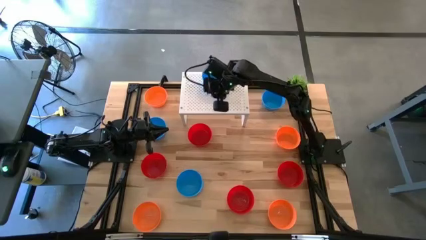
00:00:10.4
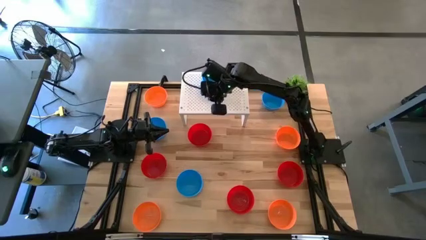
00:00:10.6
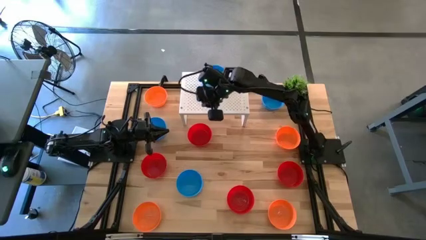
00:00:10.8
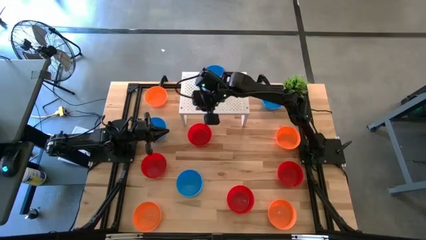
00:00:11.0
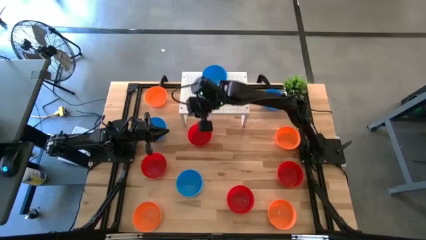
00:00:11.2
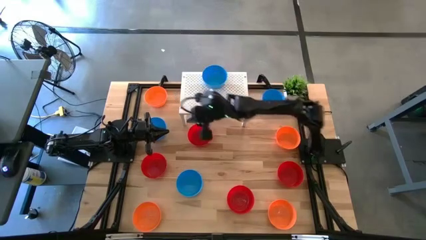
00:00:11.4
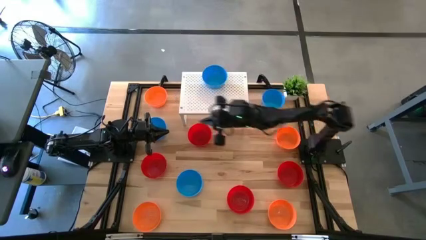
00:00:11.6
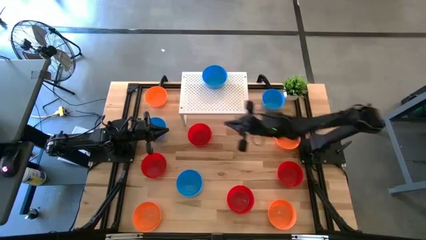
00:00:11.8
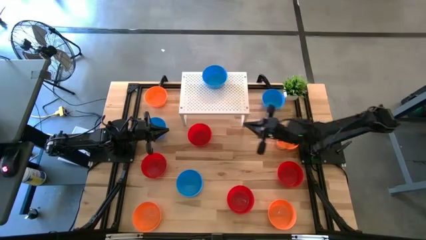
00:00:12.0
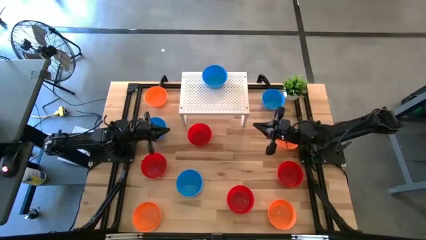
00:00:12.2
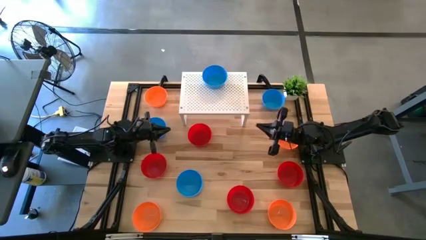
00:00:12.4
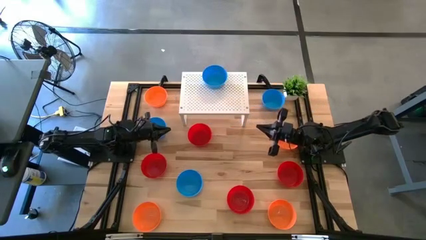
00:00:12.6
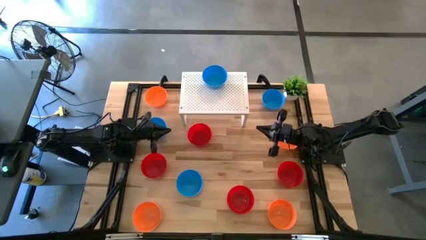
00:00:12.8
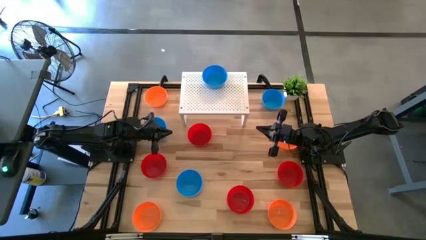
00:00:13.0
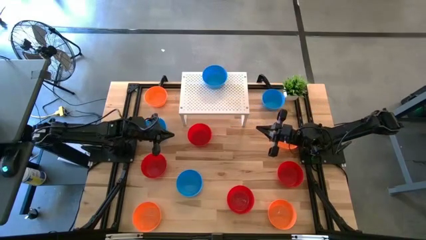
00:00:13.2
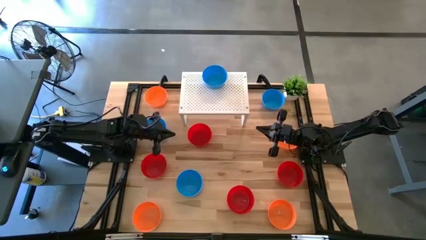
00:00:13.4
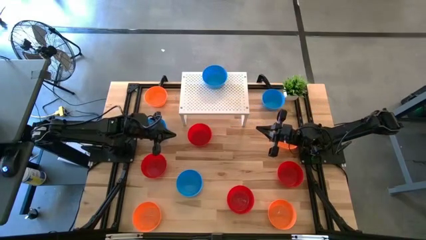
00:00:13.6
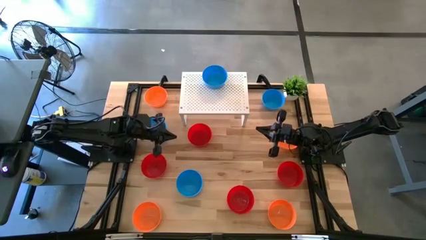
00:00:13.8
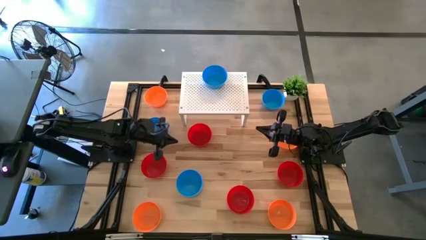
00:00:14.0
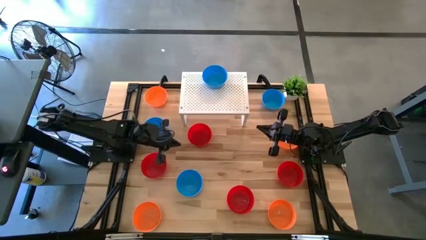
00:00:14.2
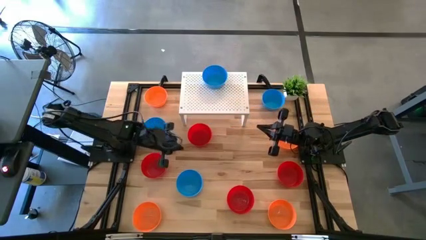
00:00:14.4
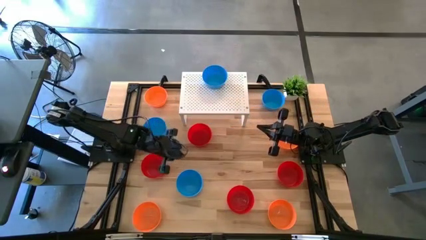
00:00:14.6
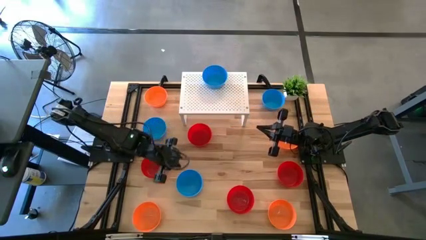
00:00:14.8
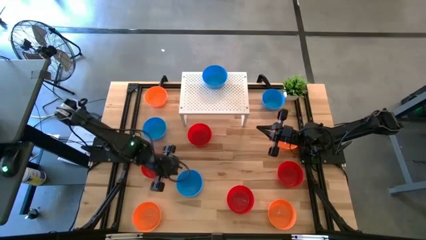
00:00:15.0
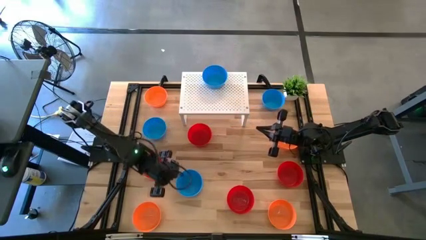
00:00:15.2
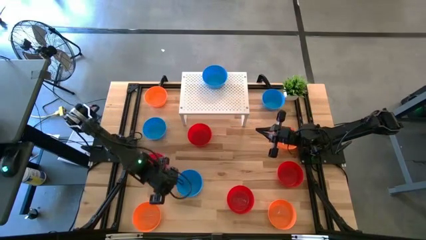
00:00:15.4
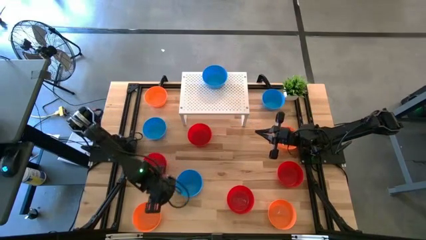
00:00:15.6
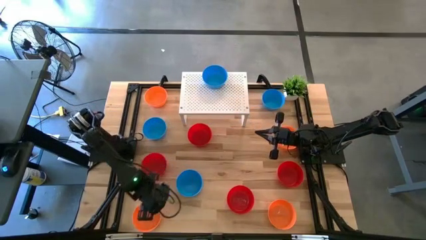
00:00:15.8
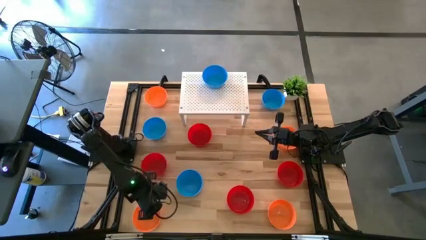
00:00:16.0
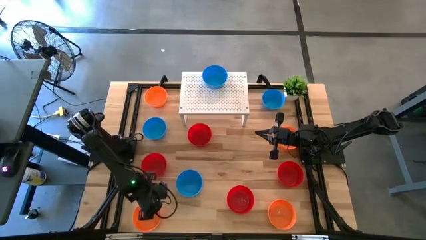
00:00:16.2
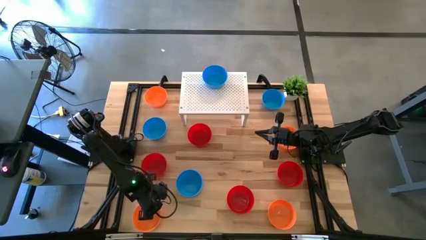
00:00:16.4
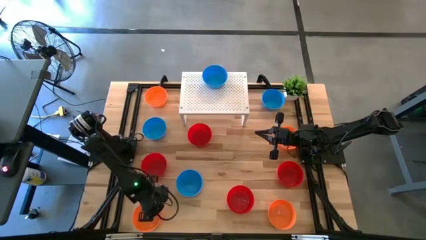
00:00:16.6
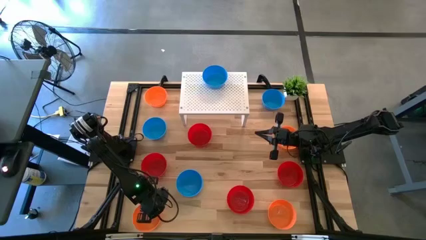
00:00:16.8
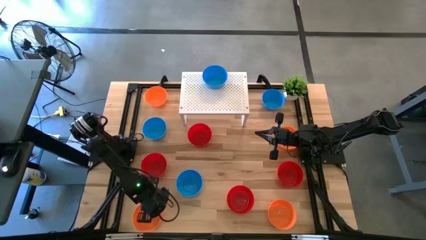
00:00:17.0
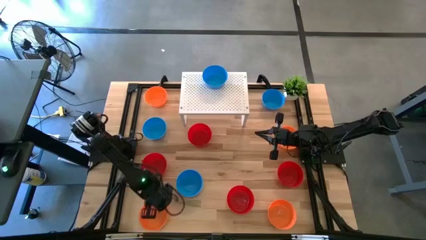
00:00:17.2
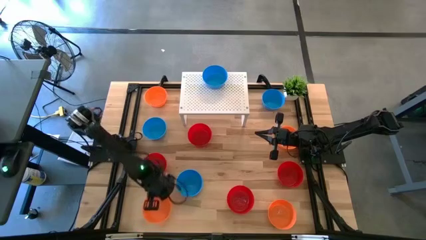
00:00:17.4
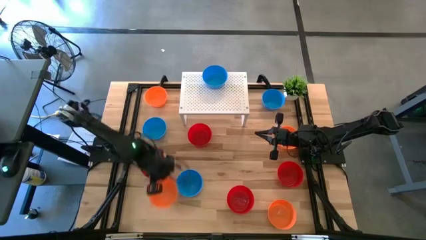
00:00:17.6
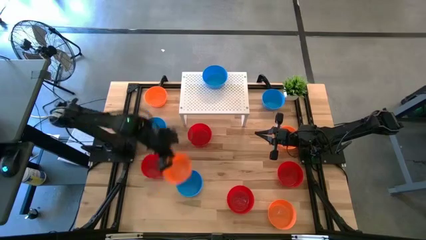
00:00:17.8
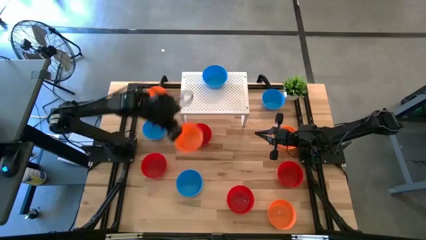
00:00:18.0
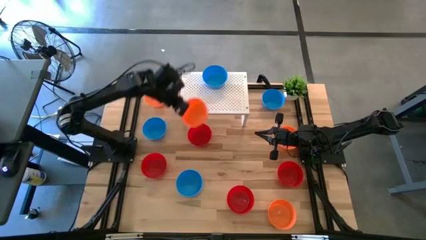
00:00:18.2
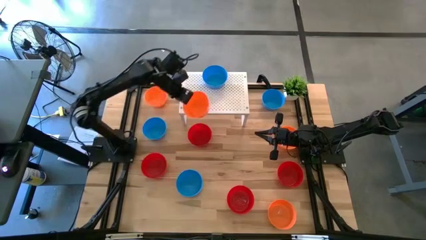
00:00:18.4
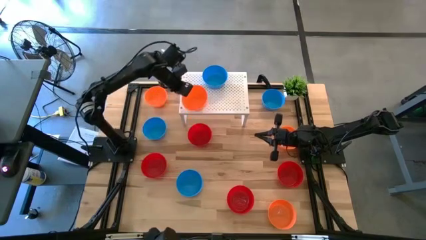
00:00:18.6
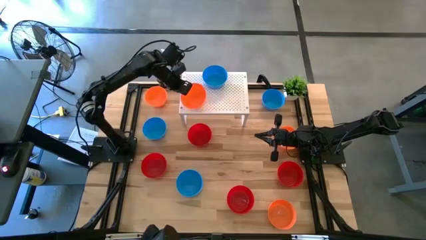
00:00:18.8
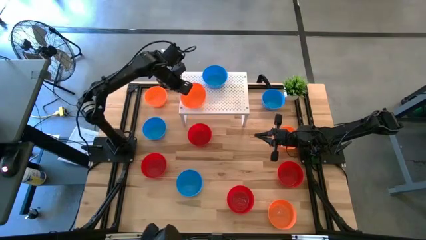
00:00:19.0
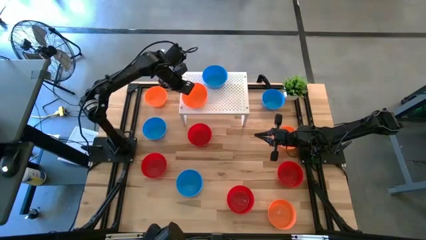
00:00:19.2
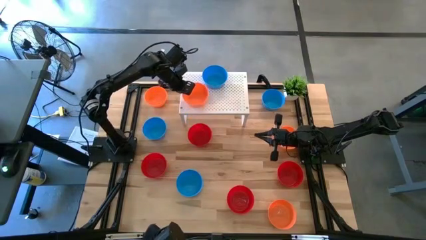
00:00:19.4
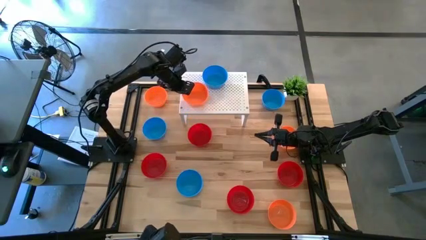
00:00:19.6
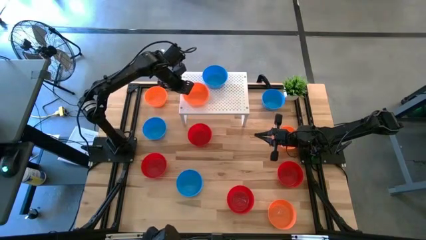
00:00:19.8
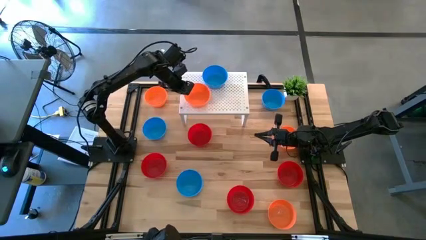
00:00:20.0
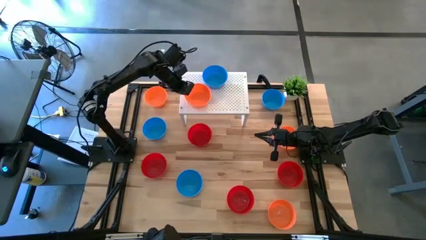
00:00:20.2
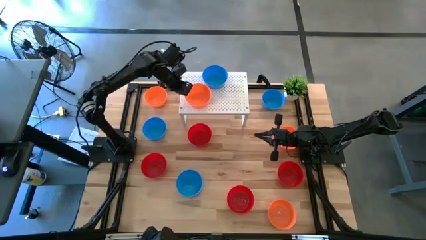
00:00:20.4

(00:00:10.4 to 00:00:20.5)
Task: Pick & Place Mini bowls
Put the orange bowl on the shelf

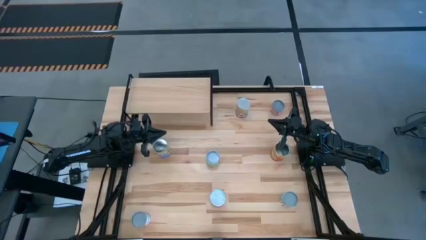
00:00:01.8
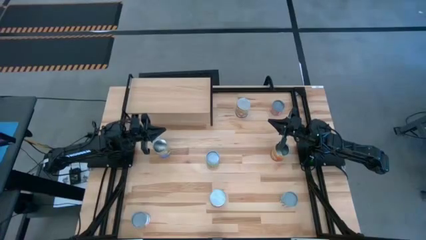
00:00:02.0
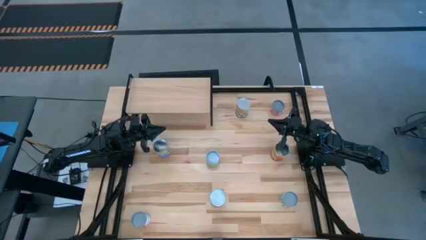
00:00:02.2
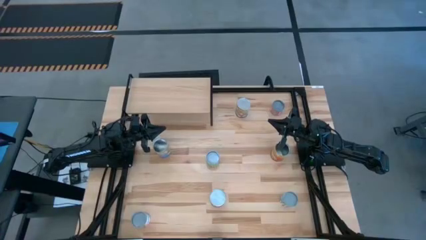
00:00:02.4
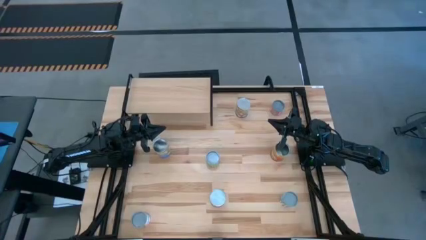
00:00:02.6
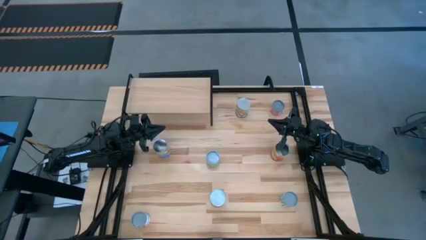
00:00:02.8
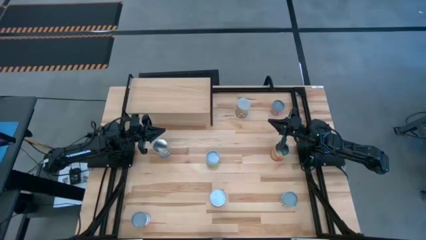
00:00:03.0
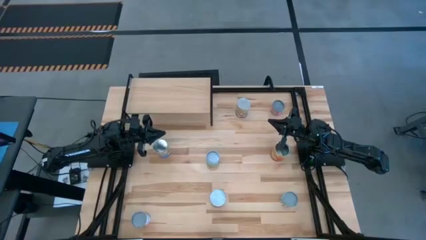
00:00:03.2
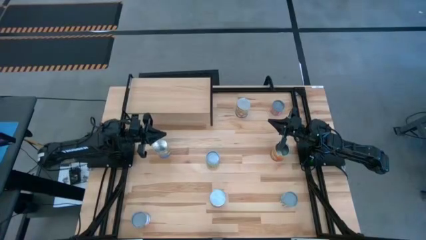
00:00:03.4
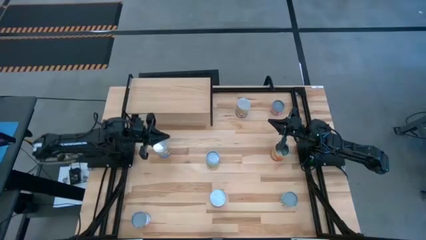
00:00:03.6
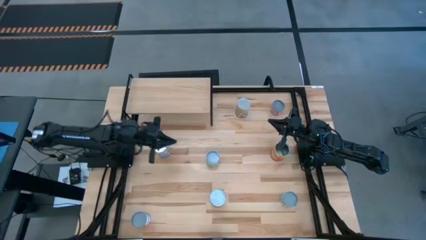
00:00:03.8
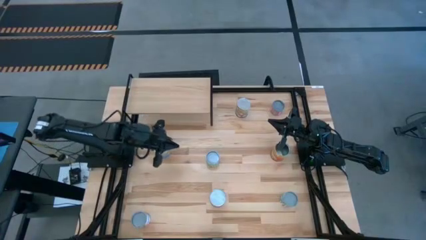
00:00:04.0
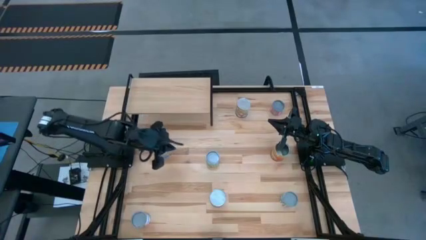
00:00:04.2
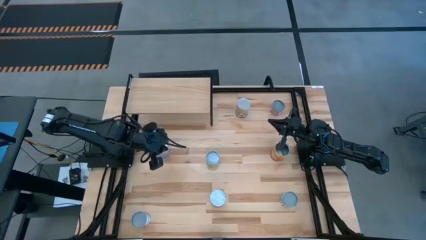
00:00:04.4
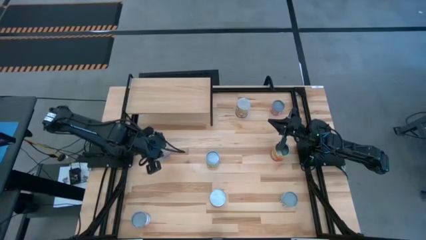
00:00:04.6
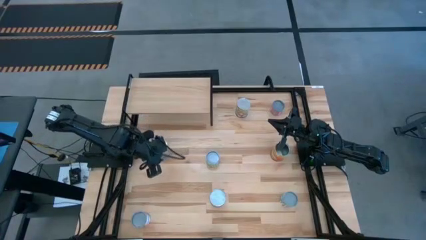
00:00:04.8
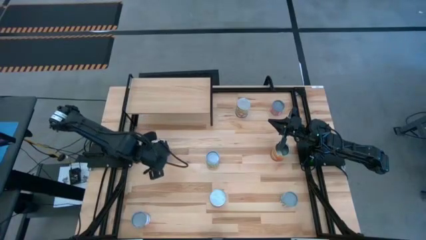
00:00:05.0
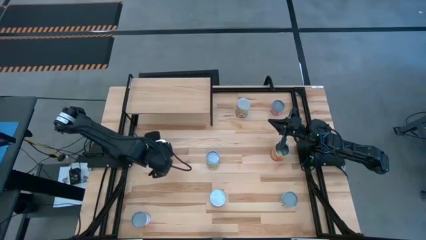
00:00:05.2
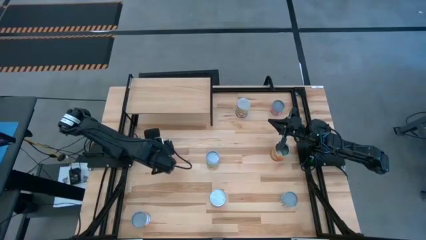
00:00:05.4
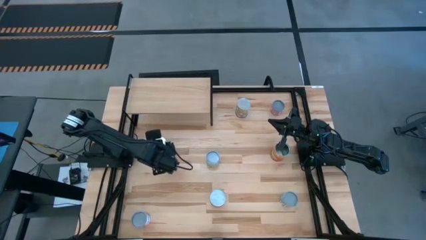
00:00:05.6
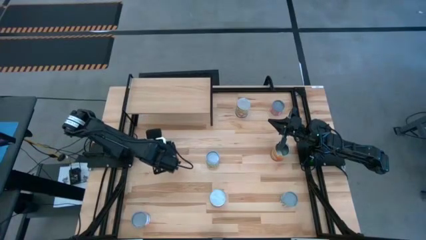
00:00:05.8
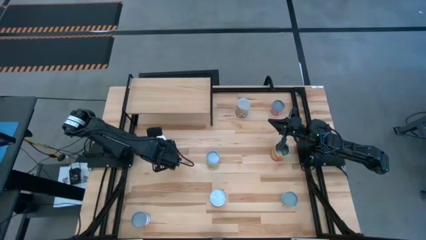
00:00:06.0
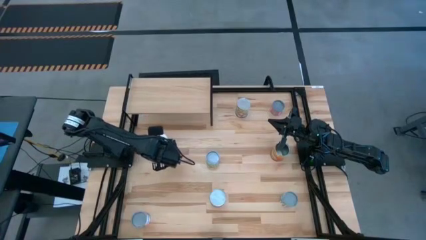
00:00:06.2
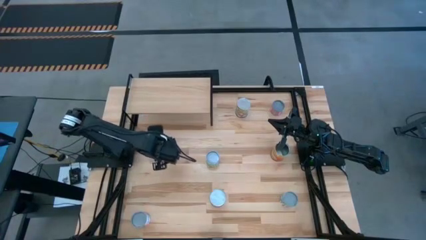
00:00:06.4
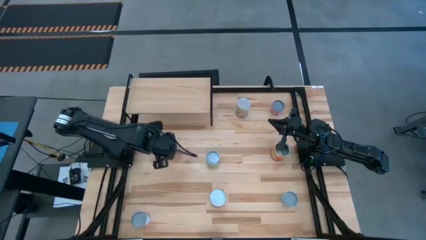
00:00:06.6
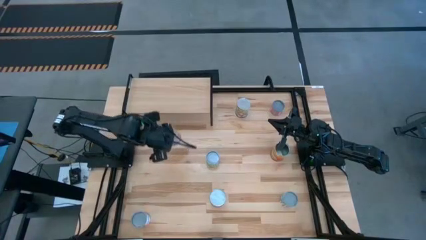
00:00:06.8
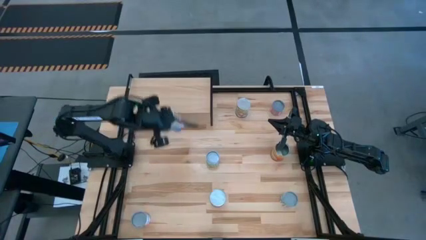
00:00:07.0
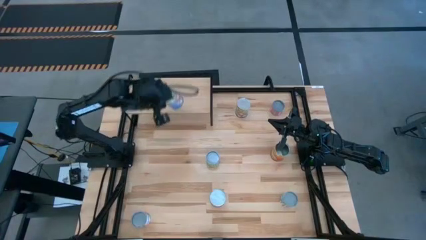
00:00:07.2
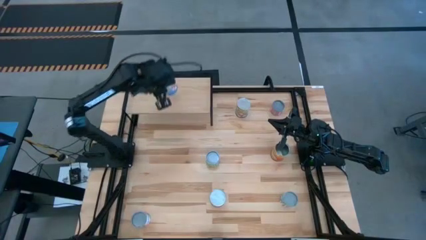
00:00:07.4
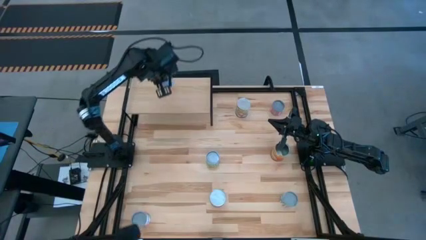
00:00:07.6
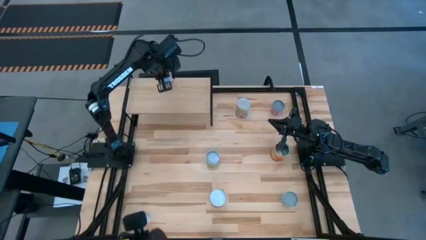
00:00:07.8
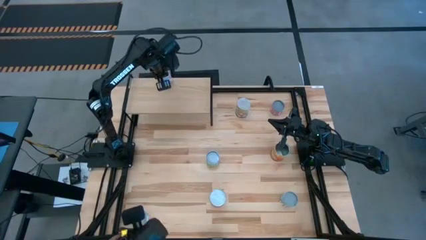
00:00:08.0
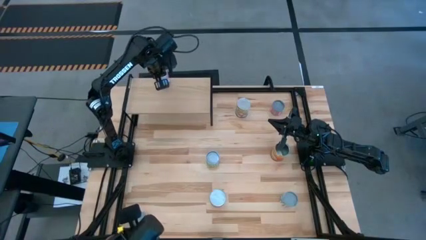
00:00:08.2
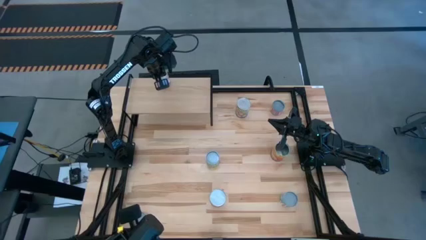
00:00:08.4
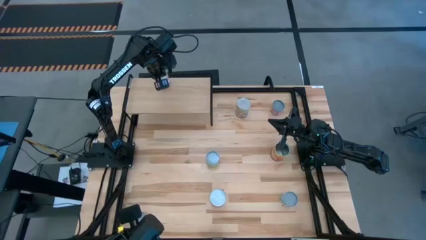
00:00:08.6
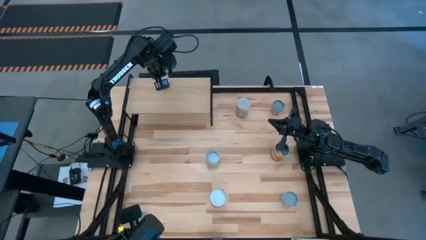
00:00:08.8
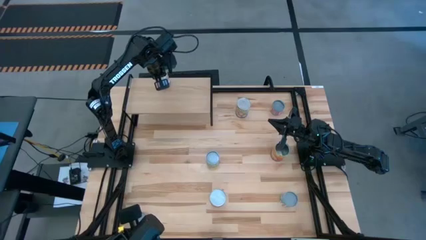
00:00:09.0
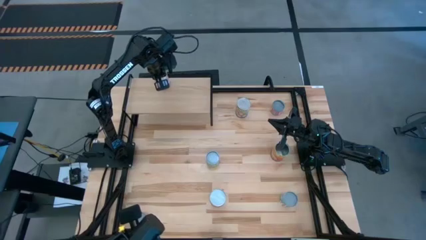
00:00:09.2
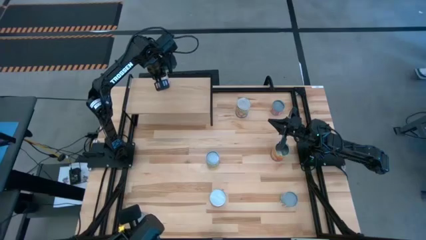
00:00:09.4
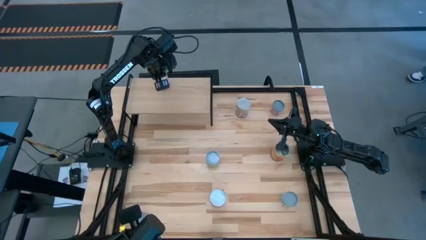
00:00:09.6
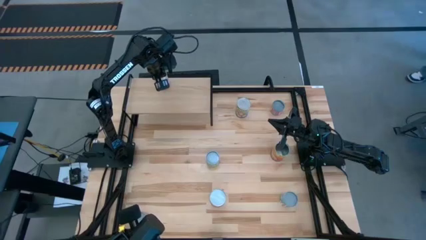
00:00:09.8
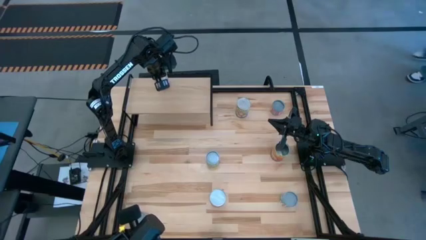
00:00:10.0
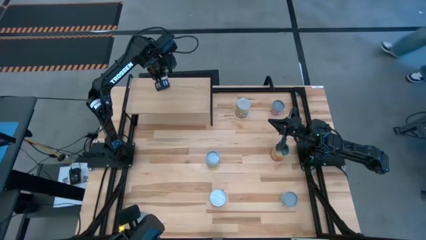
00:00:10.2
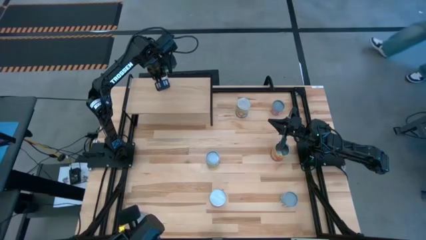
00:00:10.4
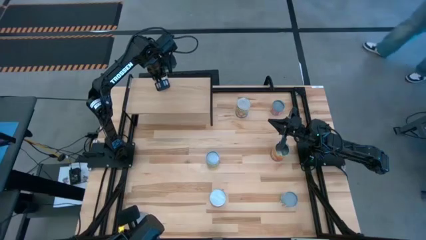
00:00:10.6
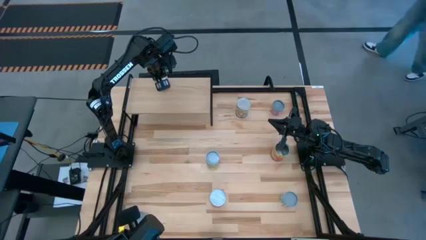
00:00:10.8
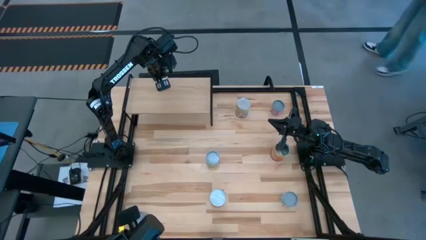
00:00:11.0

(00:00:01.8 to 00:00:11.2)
Task: Pick and place cans onto a shelf
Put the left light blue can on the shelf
